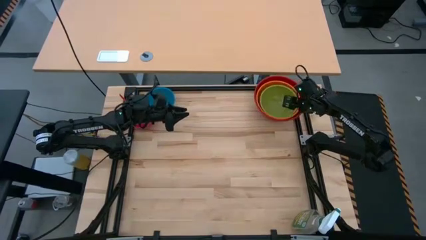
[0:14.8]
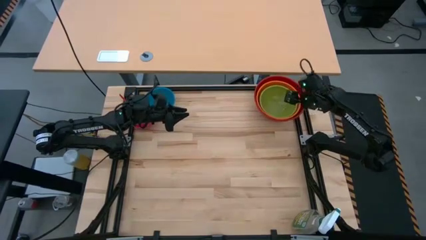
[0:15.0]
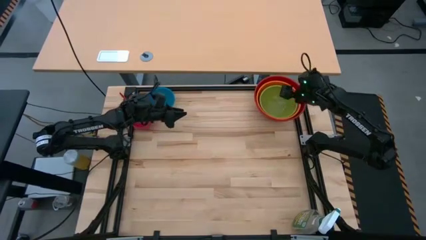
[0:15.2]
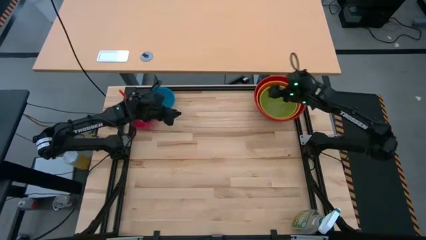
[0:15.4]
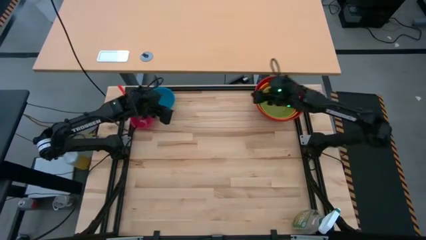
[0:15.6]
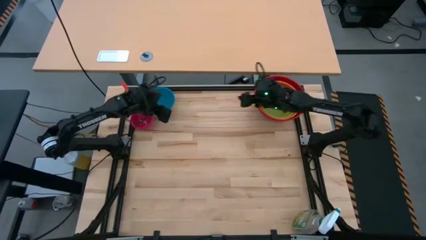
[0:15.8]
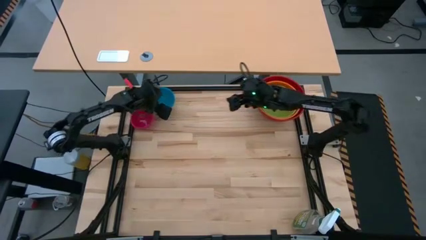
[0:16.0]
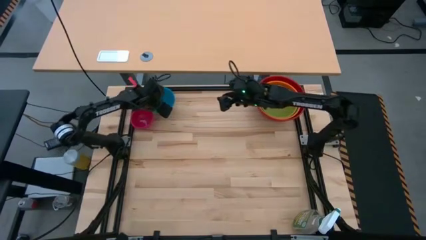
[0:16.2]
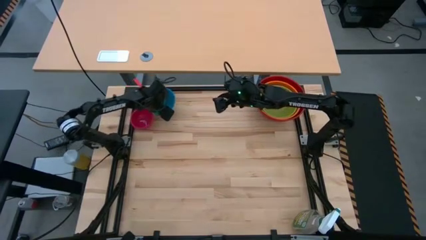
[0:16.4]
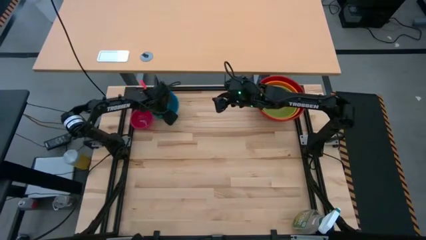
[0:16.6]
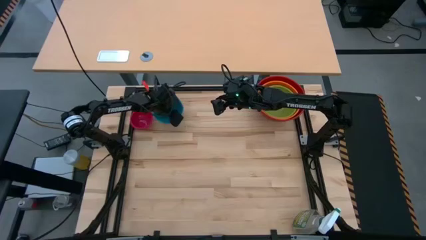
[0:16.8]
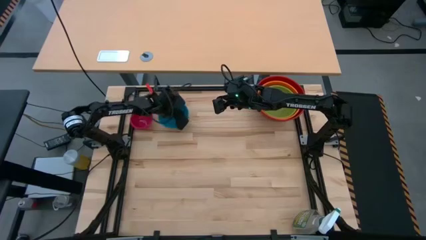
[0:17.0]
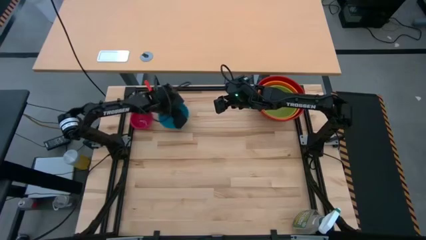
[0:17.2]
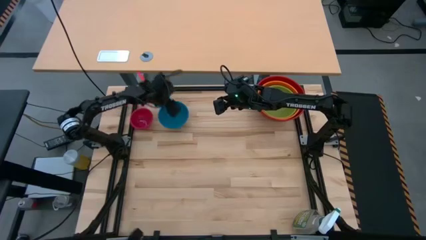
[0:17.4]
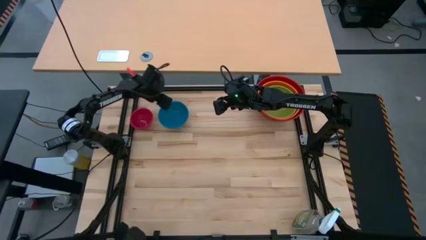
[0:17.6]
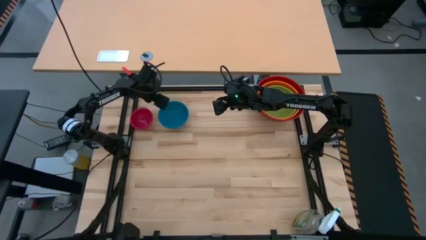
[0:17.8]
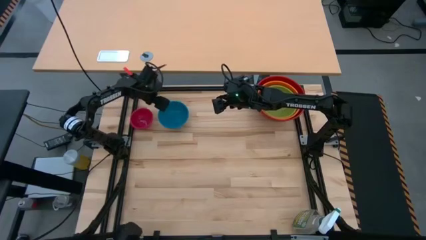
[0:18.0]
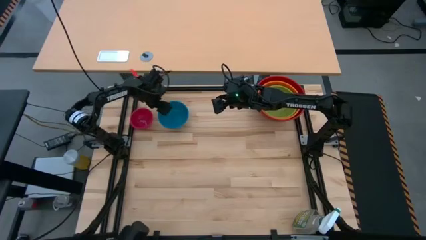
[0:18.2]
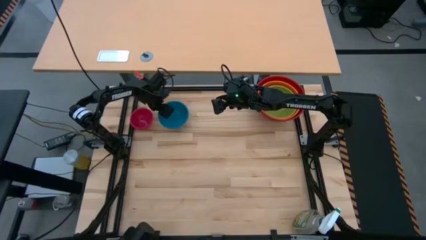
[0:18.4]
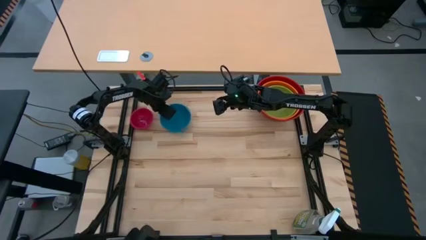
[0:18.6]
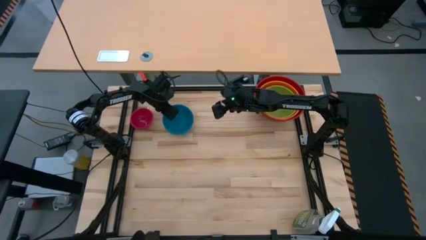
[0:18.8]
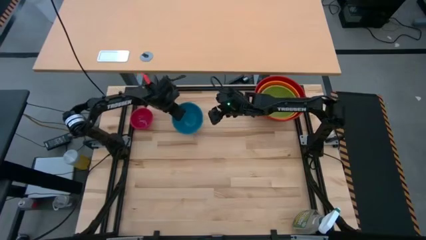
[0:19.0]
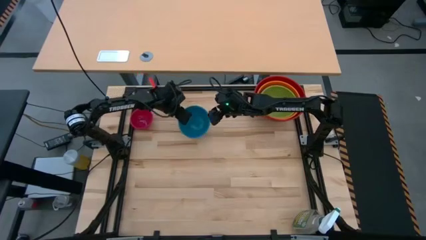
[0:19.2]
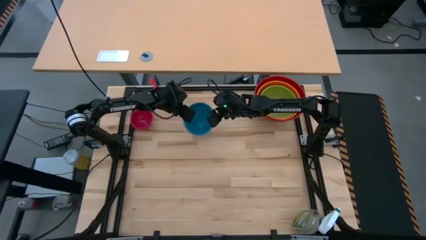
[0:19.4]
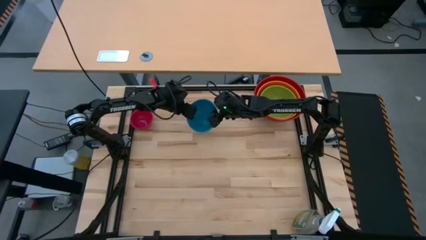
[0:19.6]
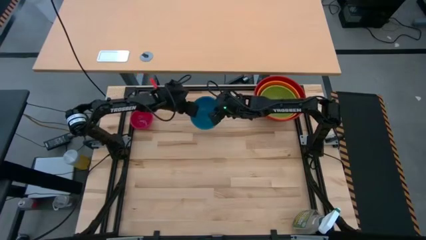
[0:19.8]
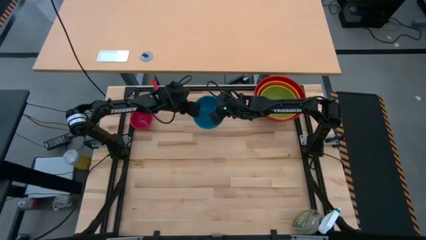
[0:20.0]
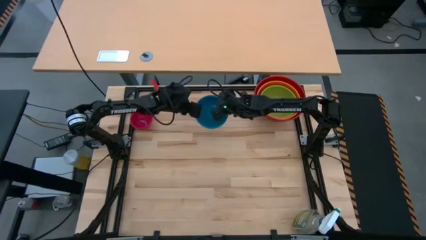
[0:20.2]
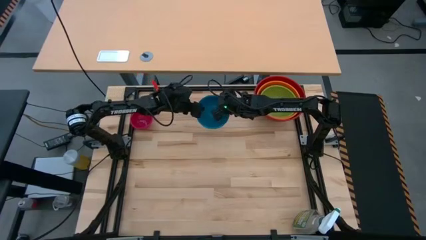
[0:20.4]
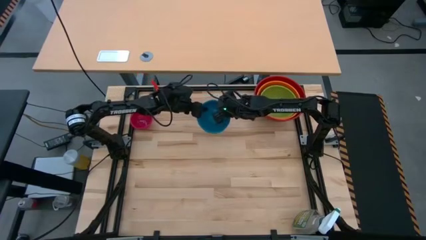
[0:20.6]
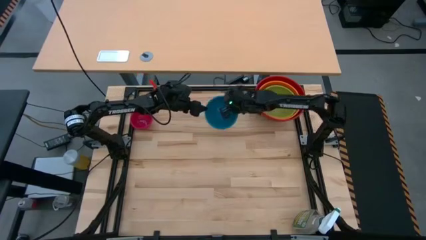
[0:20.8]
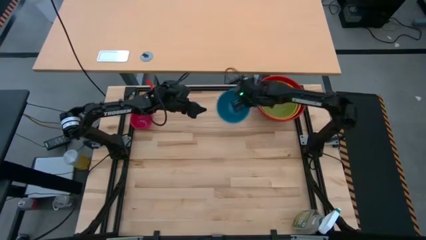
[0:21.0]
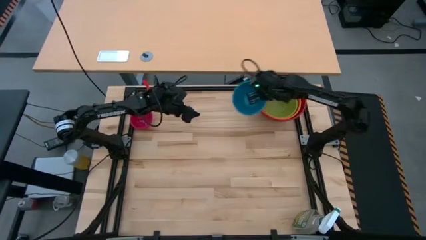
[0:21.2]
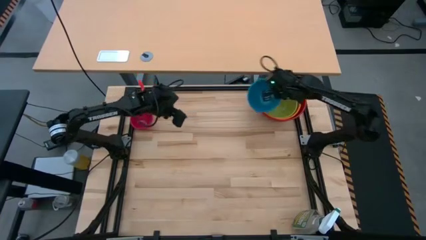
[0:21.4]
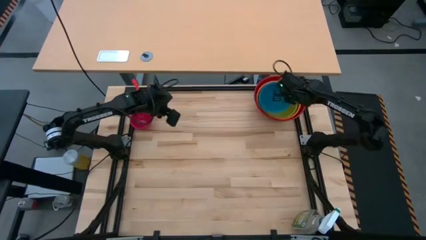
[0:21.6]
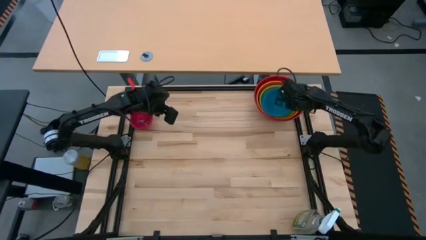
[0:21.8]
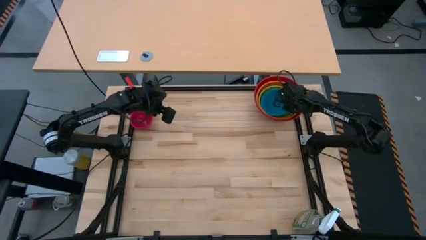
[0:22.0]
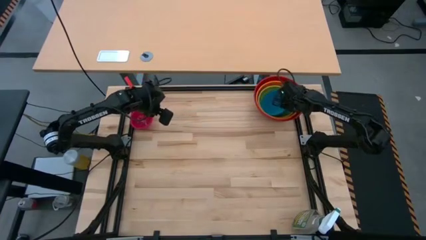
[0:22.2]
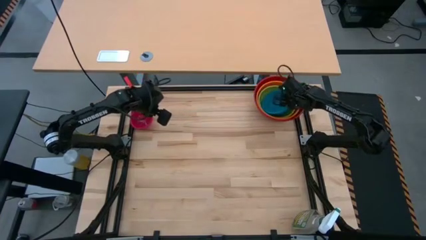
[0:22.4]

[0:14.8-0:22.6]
Stack the blue bowl on top of the green bowl

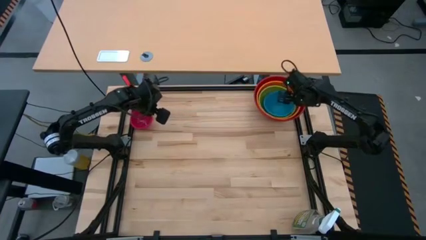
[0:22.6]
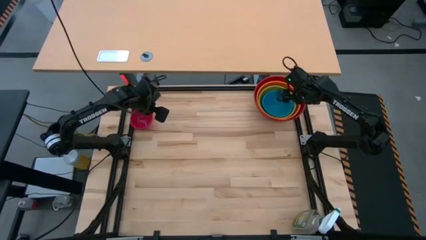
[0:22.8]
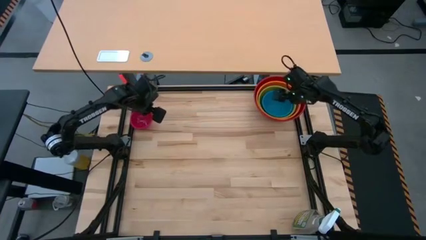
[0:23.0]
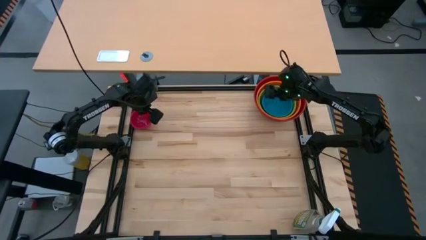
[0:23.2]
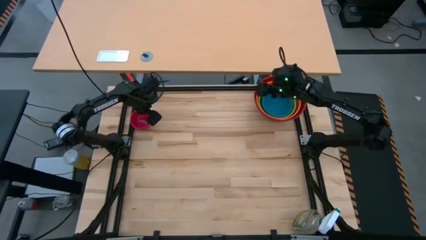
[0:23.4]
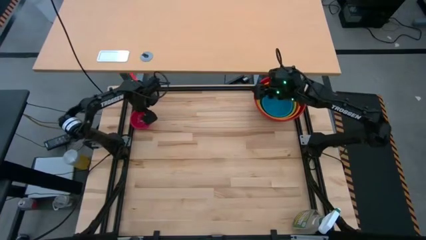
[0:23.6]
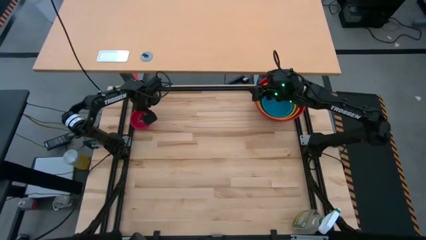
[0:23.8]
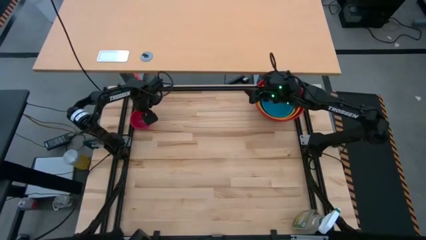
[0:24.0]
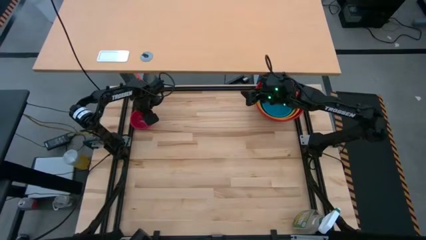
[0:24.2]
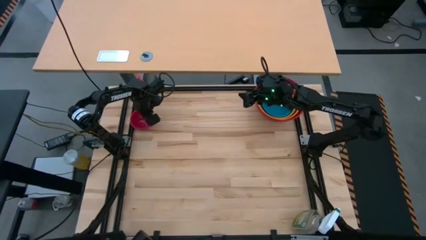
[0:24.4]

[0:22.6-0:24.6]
Stack the pink bowl on top of the blue bowl

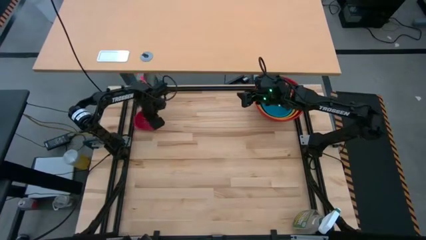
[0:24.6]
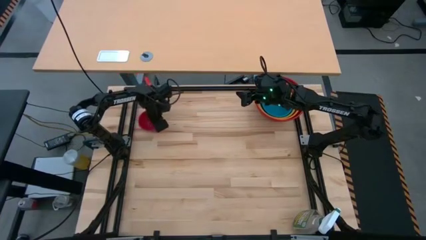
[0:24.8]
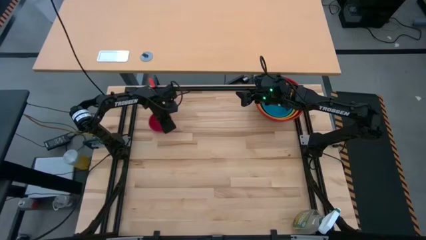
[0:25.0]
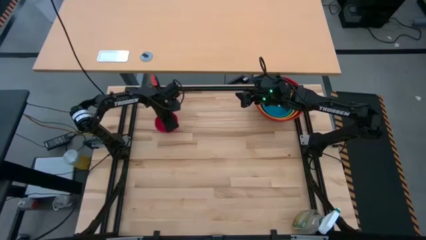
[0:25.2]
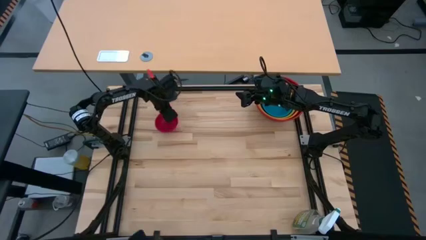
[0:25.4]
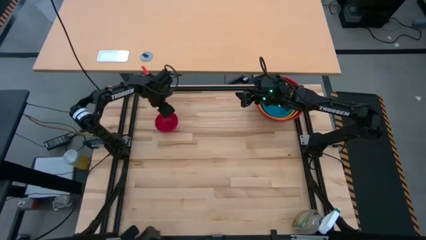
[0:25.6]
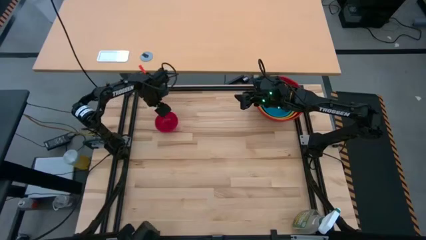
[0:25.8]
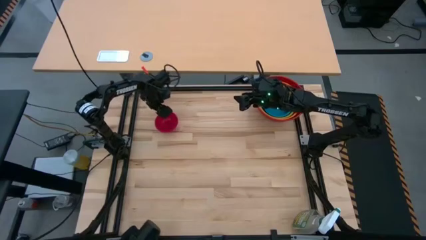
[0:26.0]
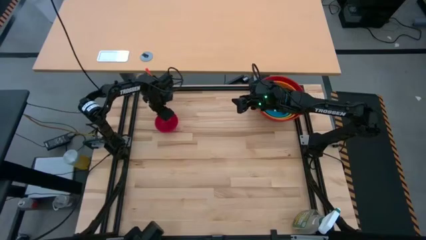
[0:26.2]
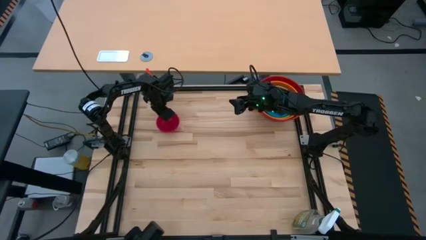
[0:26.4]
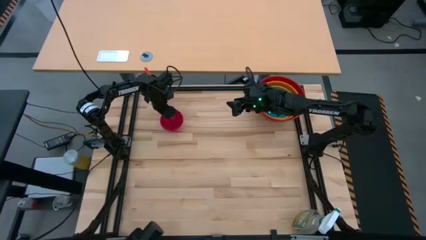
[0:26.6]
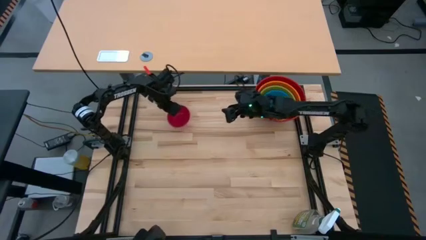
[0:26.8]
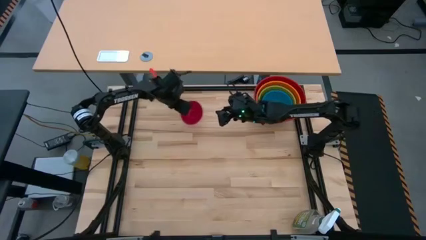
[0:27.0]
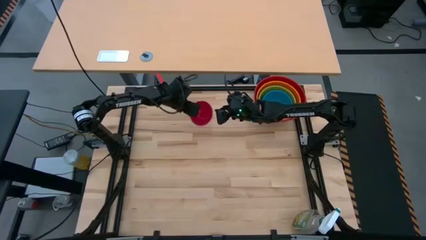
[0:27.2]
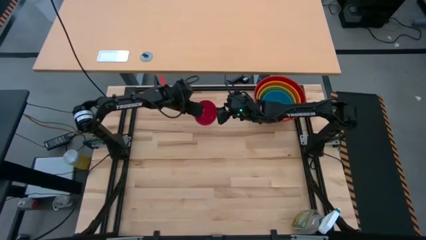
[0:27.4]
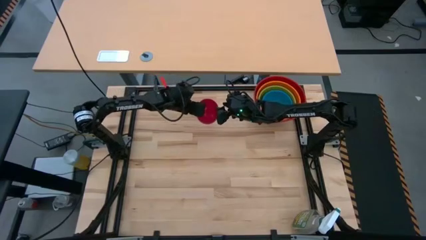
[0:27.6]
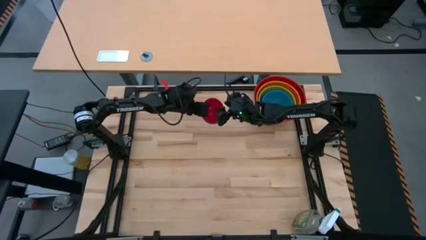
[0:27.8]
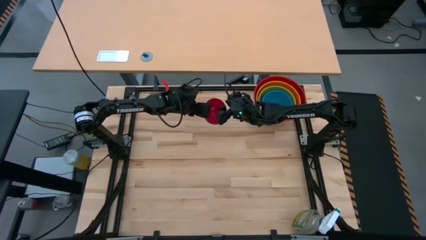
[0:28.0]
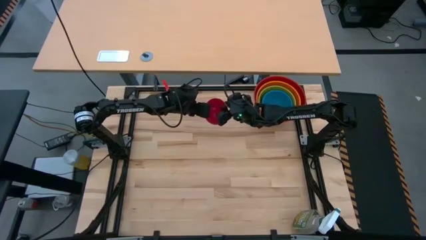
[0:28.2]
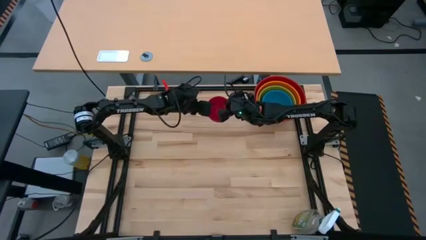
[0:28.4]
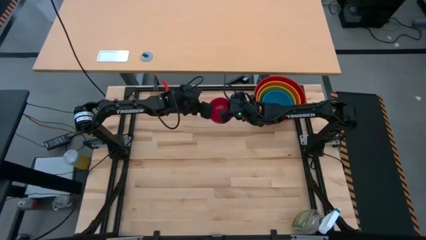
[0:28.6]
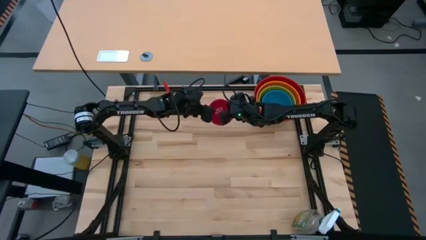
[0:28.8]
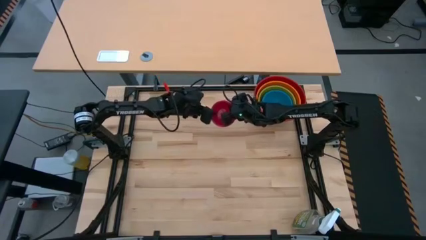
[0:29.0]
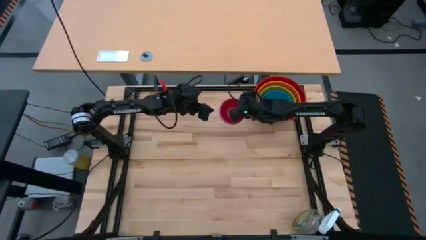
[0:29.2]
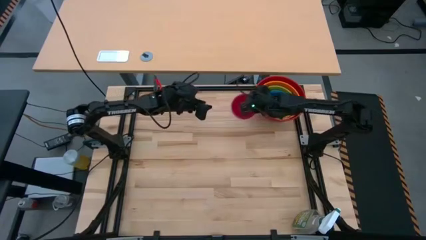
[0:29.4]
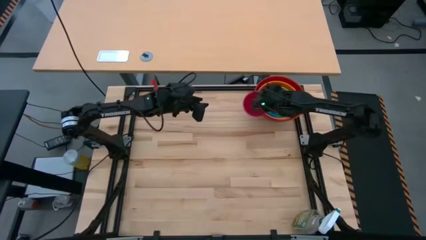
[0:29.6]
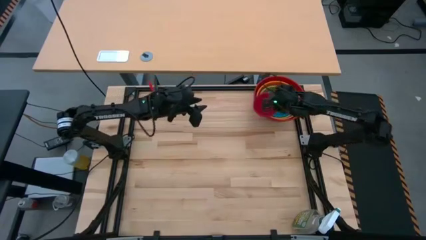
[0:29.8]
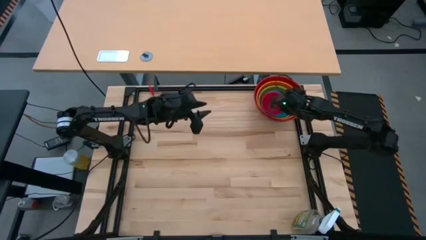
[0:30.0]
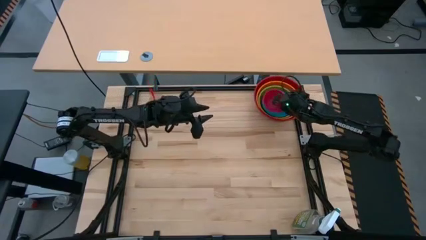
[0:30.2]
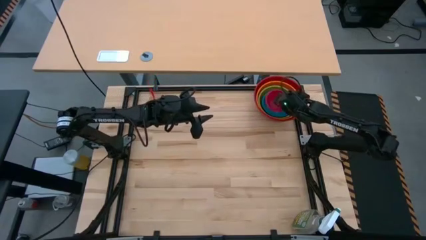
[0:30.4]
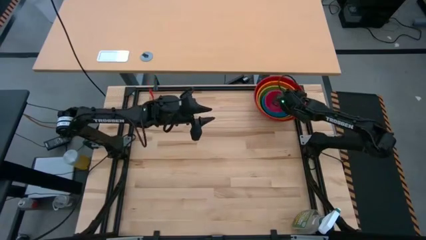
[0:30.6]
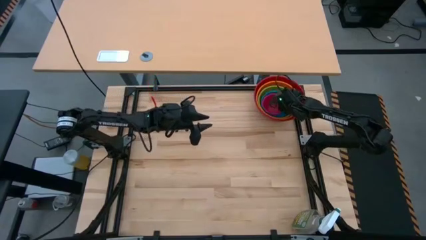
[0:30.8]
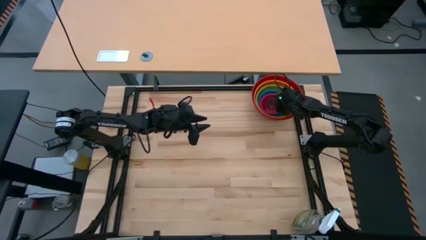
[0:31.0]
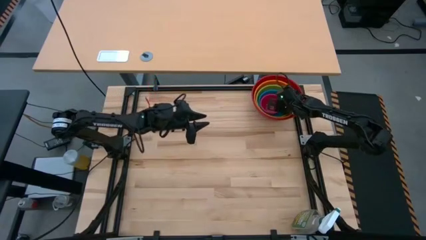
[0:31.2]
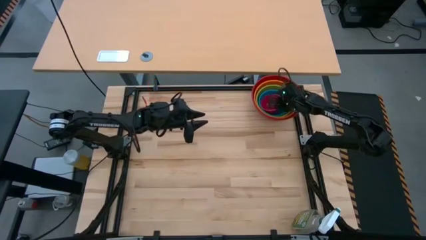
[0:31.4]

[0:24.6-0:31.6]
Stack the pink bowl on top of the blue bowl
